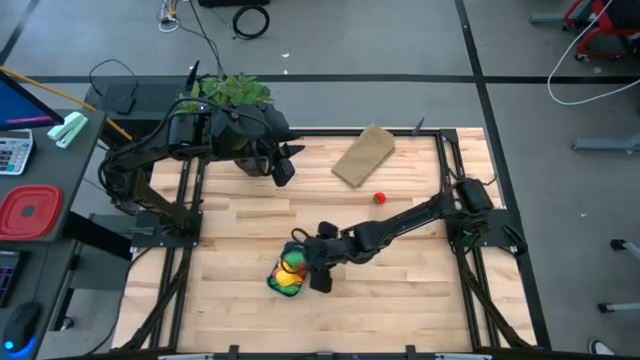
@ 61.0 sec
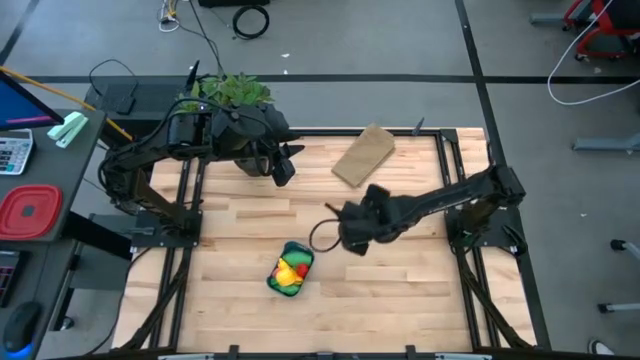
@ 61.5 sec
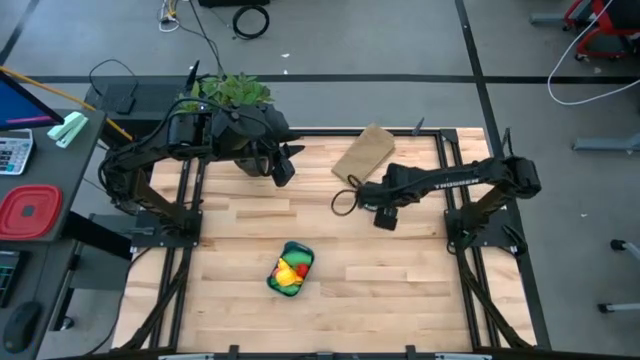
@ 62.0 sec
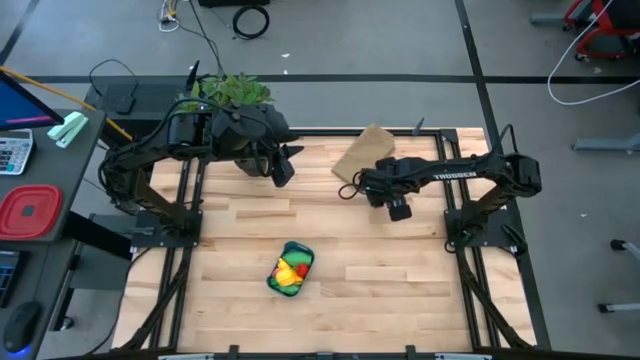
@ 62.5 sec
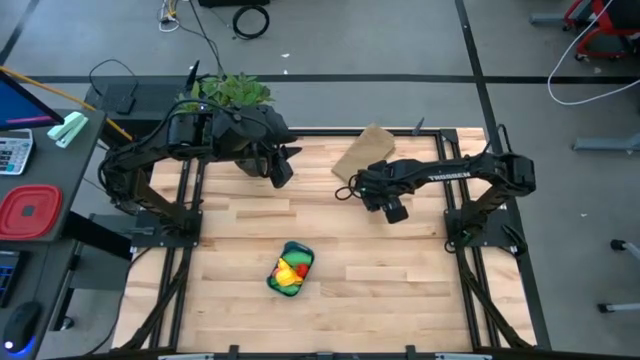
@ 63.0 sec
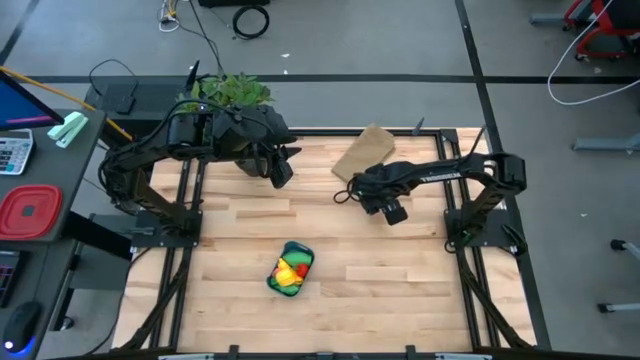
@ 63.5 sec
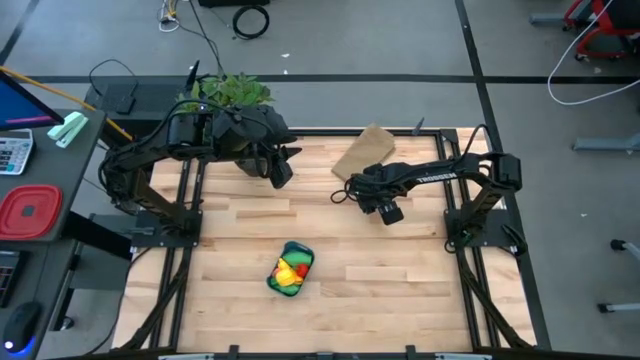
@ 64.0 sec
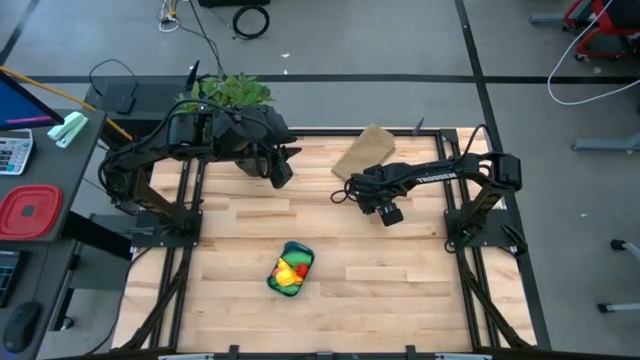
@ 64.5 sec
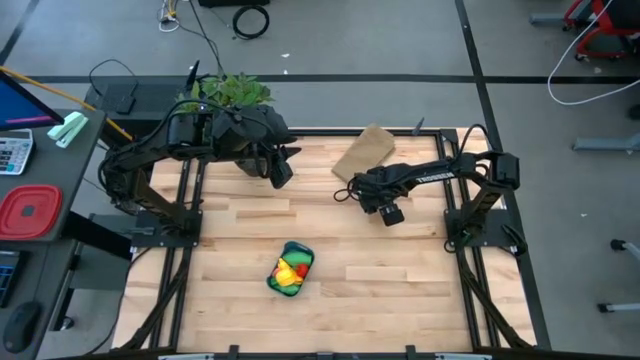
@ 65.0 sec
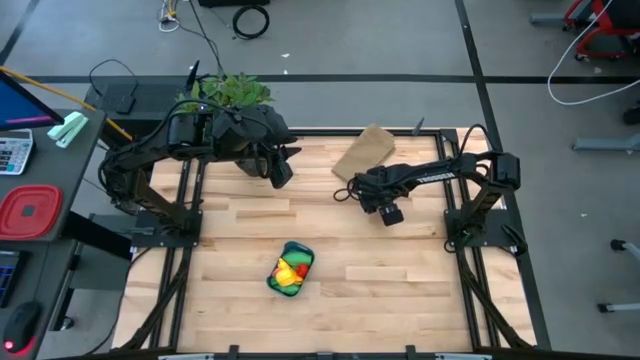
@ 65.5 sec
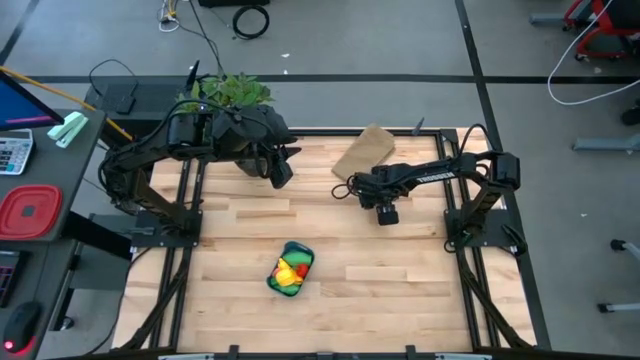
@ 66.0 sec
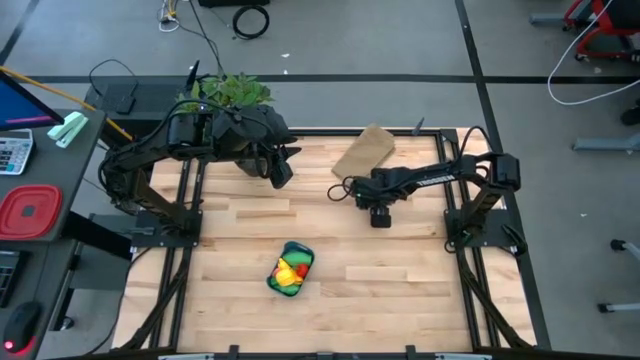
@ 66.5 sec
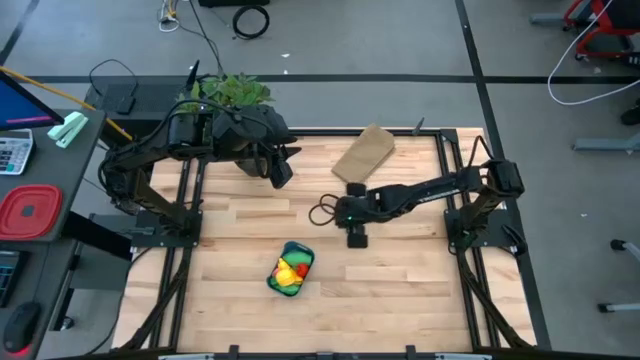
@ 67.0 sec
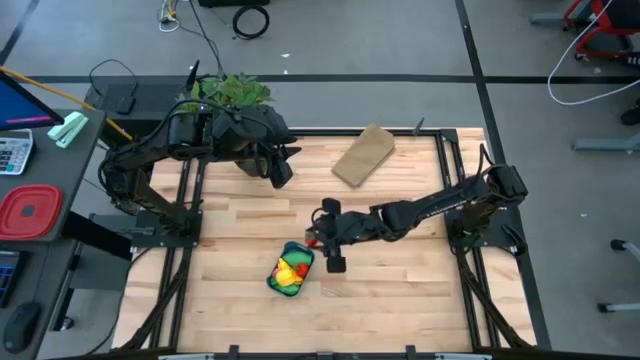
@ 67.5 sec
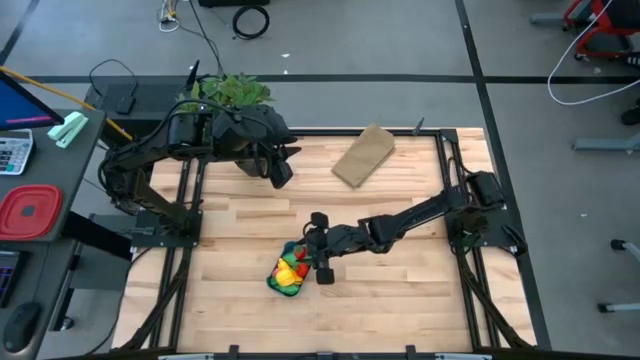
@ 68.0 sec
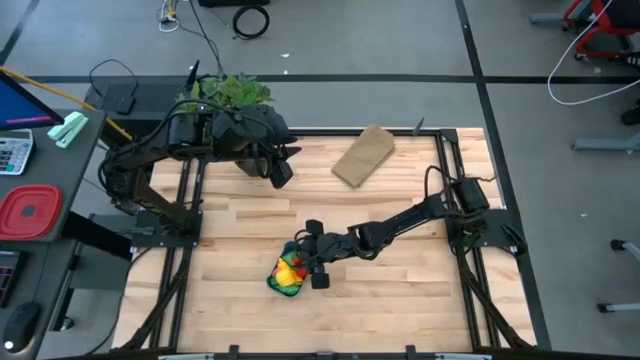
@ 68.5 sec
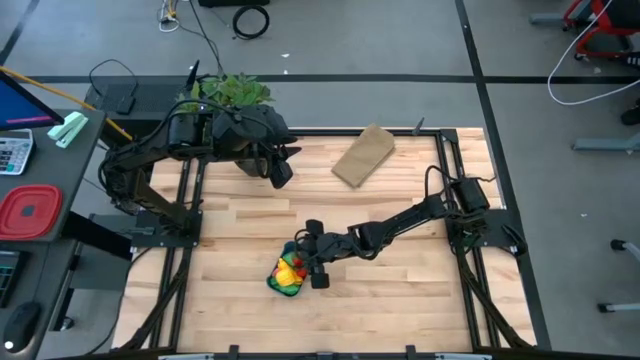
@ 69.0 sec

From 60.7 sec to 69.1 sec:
Task: Pick and placing Produce into tupperware
Put the red strawberry into the blue bin

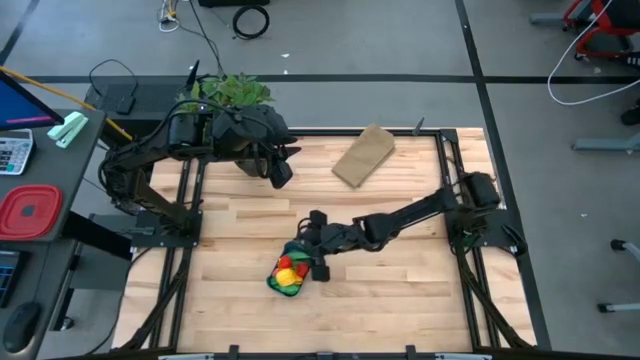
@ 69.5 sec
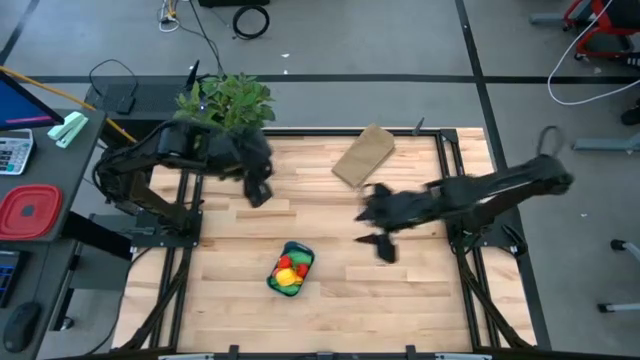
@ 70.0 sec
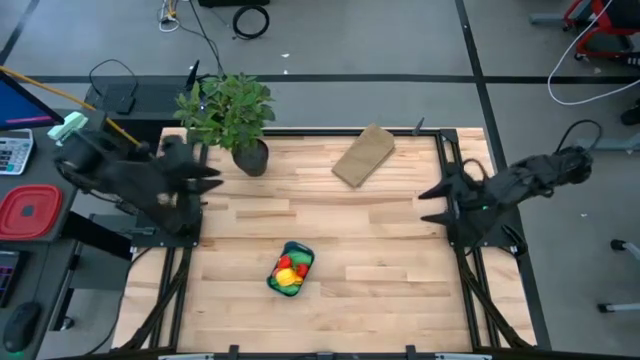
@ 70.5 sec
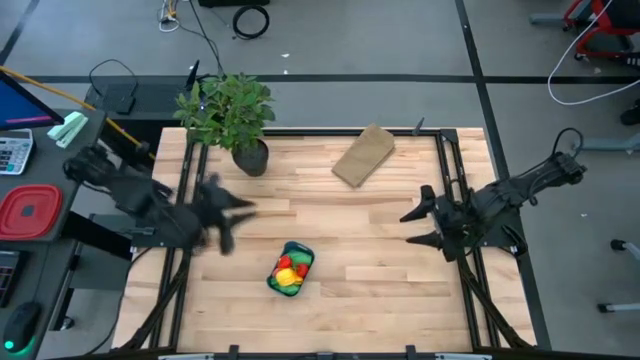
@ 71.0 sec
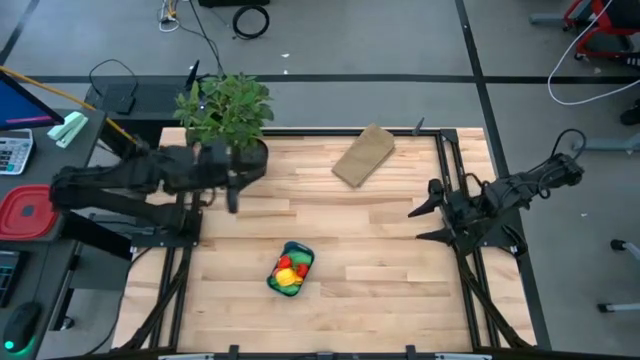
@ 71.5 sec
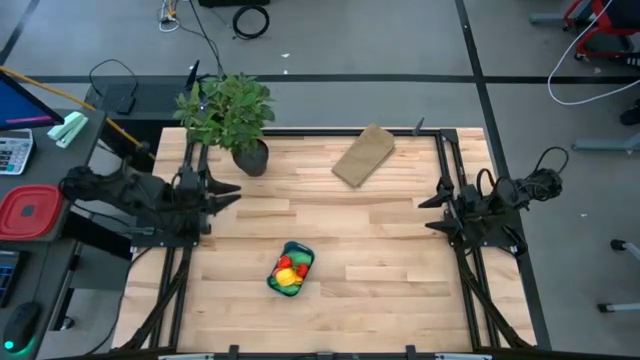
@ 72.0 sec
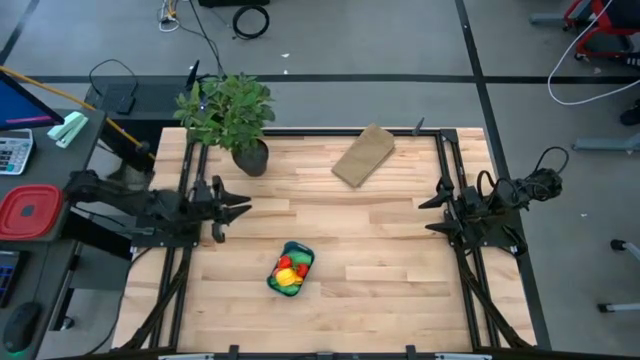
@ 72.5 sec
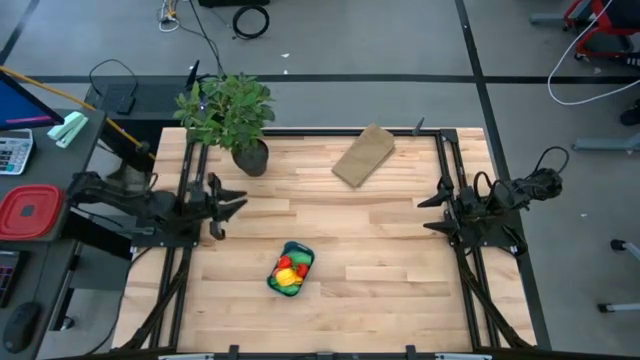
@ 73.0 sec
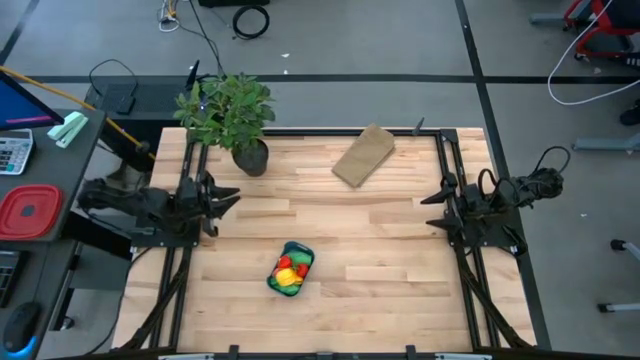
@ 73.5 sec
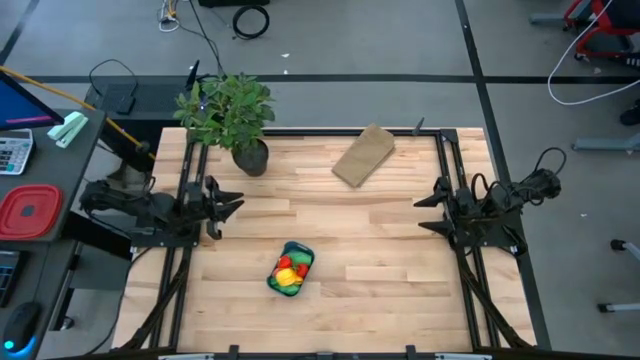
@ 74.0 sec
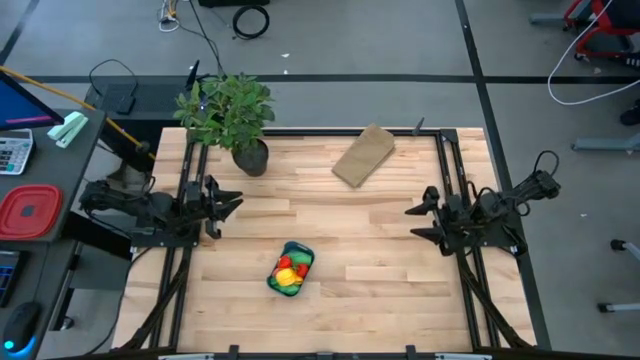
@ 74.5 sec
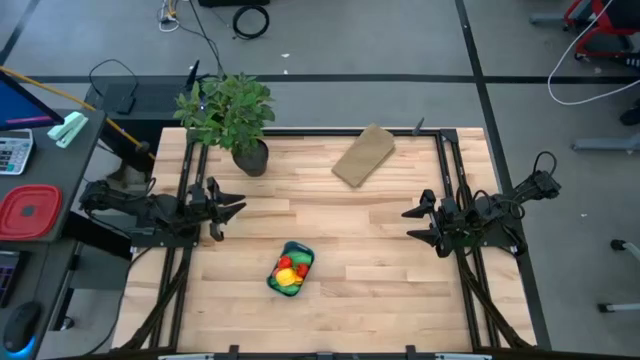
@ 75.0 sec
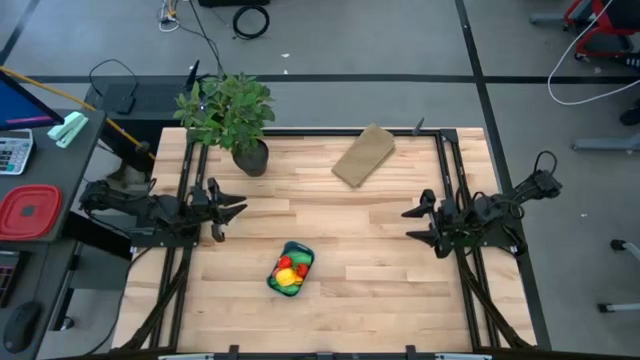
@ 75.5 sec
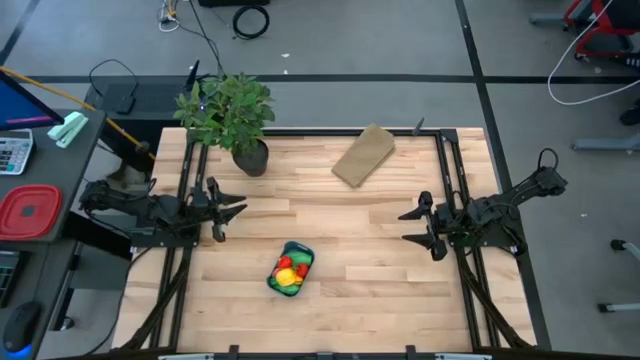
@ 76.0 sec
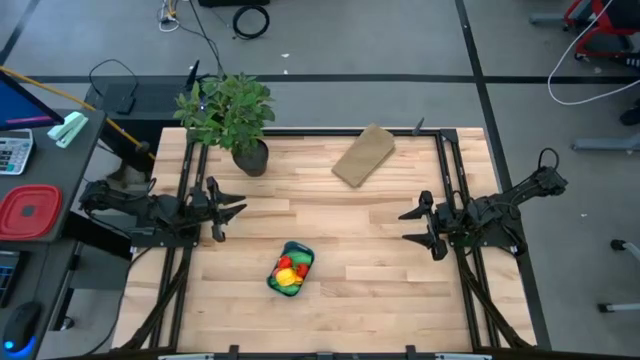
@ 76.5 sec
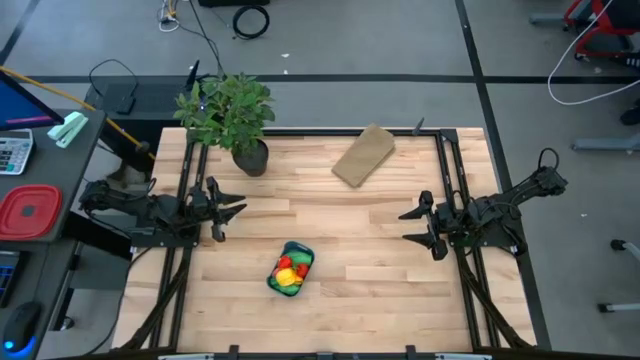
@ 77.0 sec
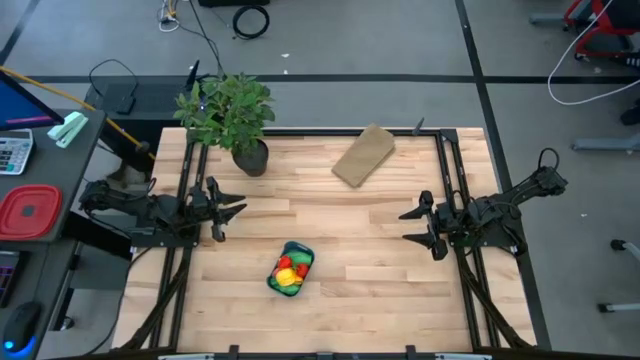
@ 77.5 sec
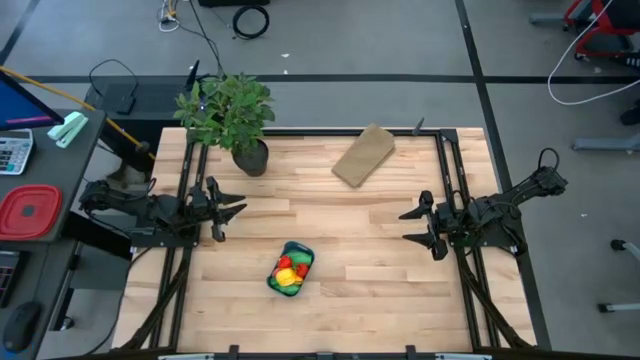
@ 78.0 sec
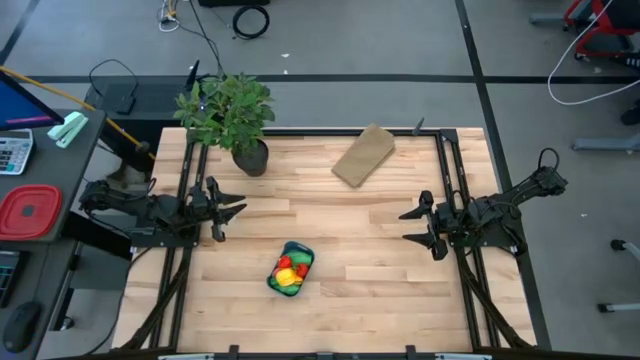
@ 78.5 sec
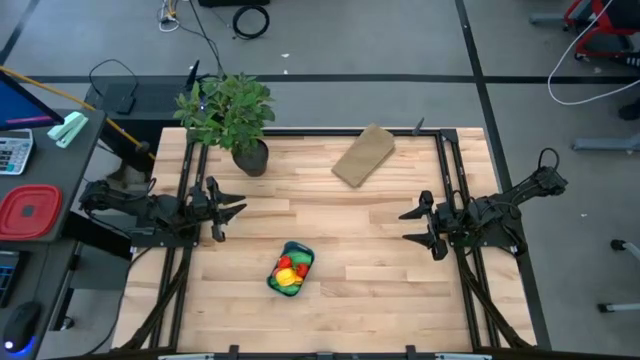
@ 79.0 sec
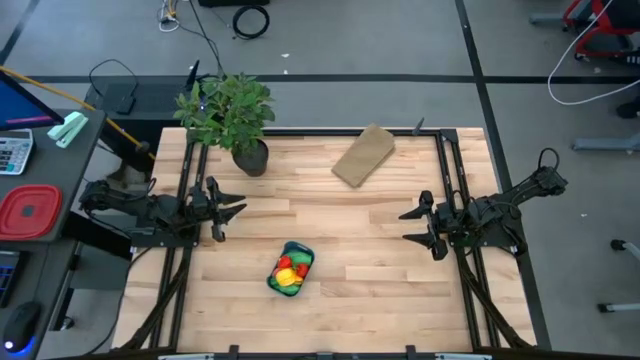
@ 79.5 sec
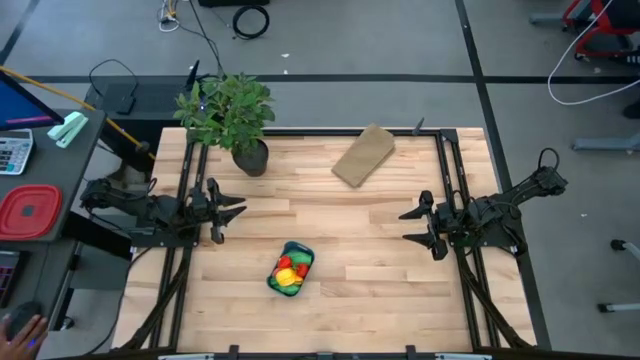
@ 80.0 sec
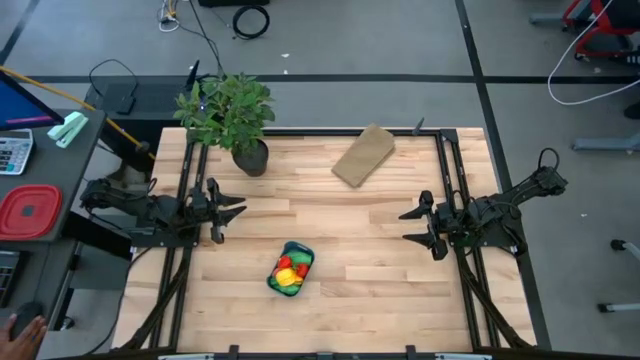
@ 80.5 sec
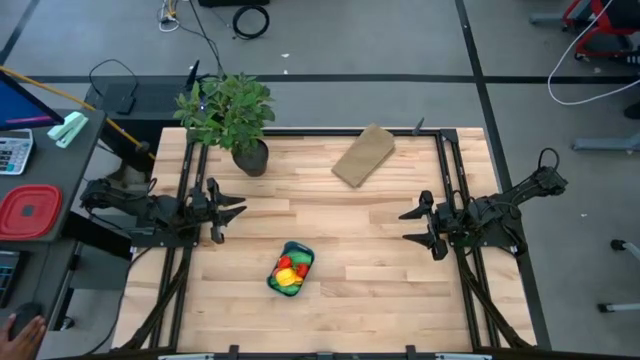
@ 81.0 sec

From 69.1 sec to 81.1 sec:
Return to Home Position
